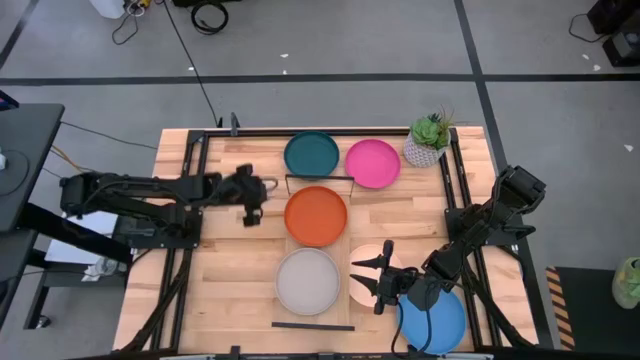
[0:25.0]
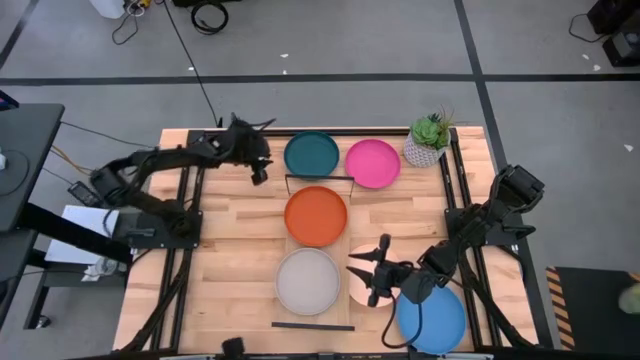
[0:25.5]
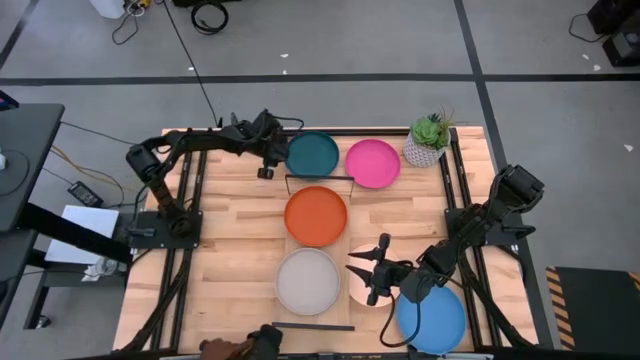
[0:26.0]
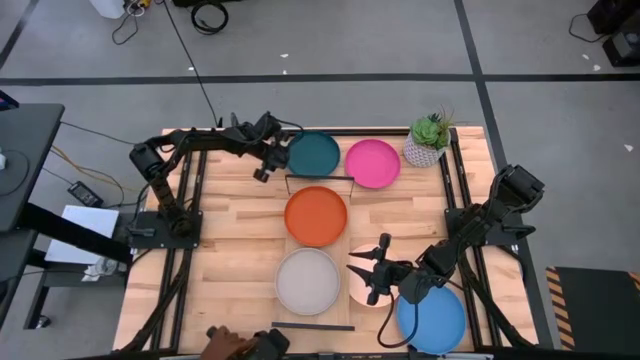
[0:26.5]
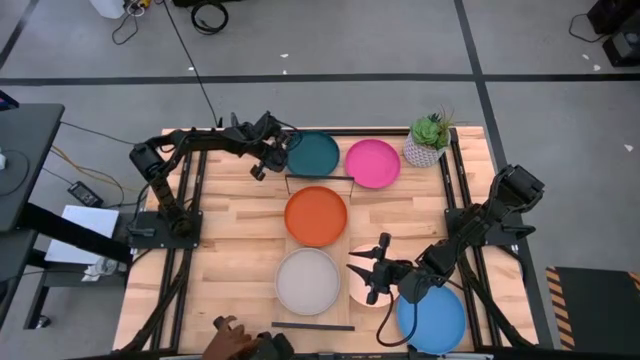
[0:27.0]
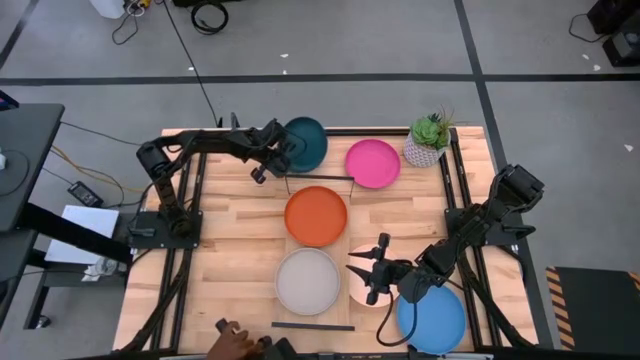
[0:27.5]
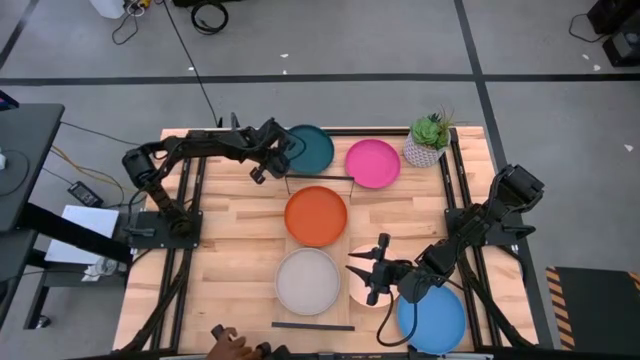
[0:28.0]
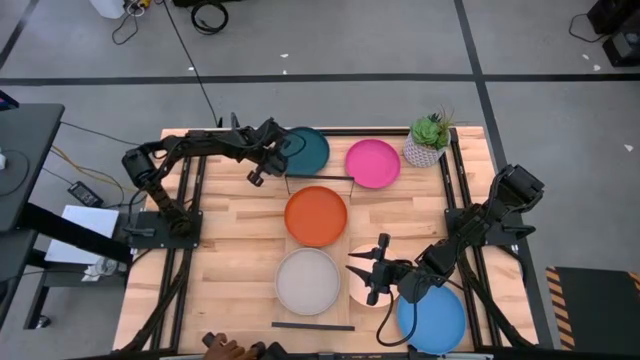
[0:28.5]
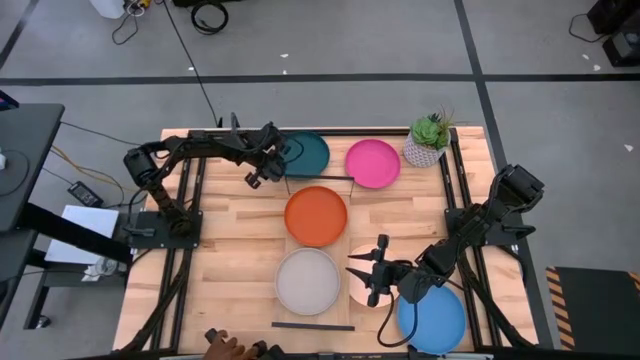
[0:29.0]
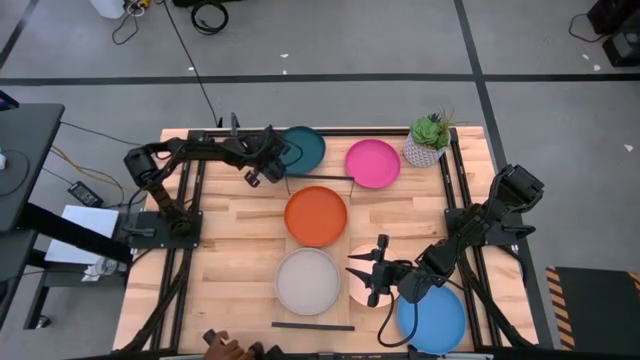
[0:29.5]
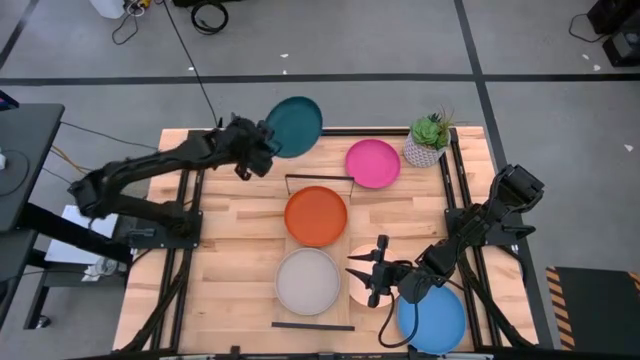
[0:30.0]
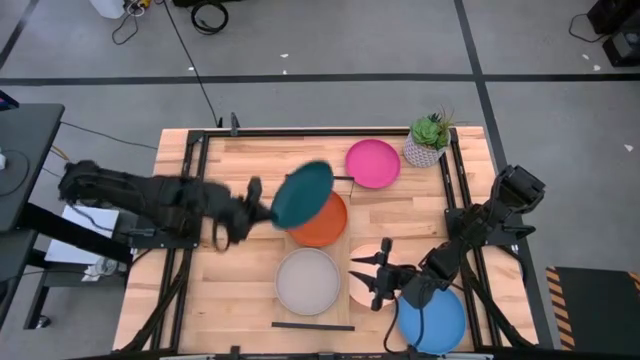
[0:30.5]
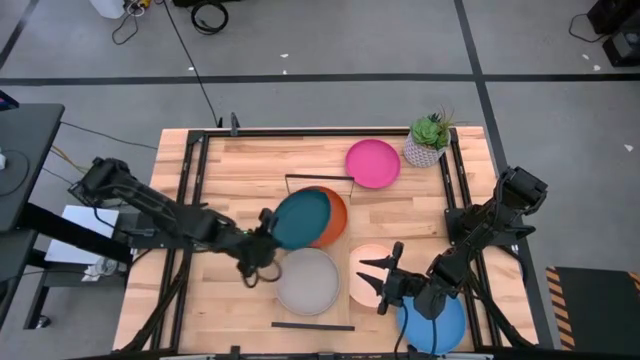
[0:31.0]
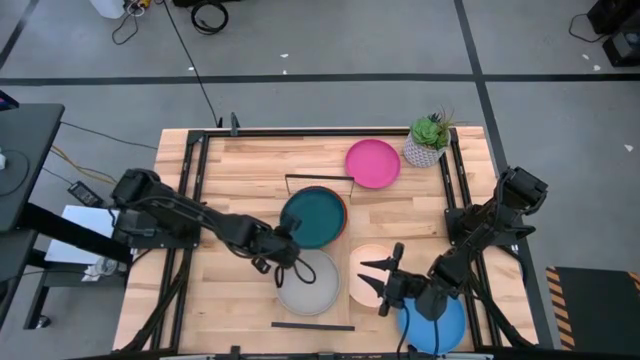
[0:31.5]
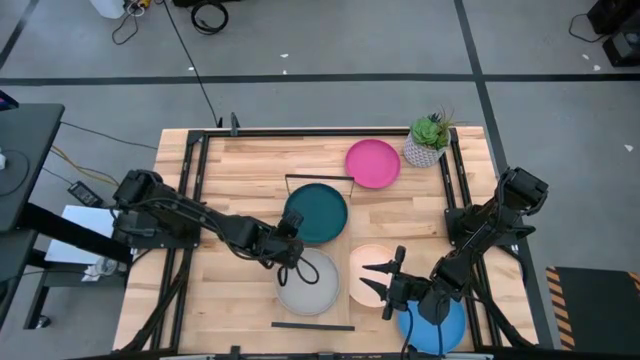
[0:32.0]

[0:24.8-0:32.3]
Task: Place and stack plates onto a shelf
Stack the dark blue plate on top of the orange plate on the shelf

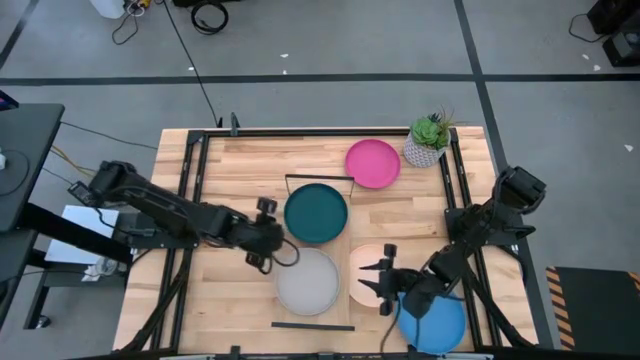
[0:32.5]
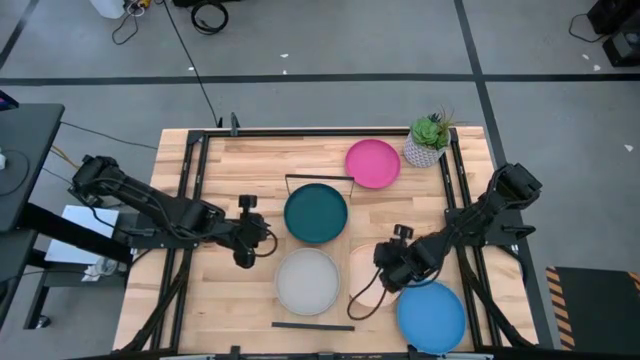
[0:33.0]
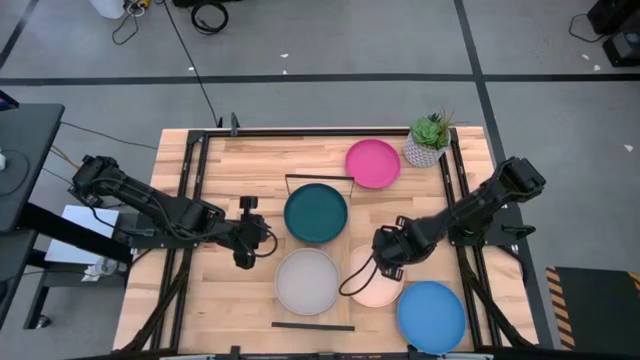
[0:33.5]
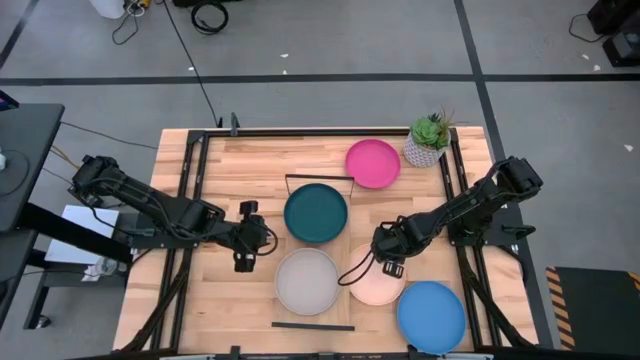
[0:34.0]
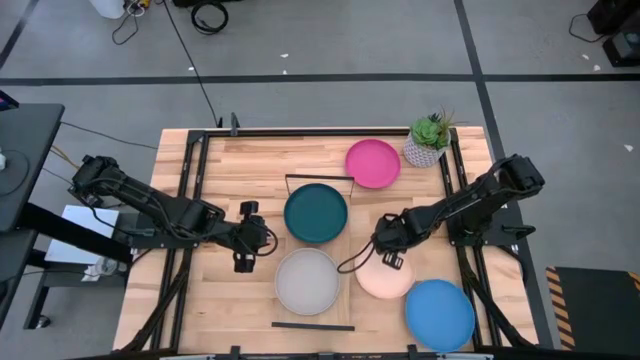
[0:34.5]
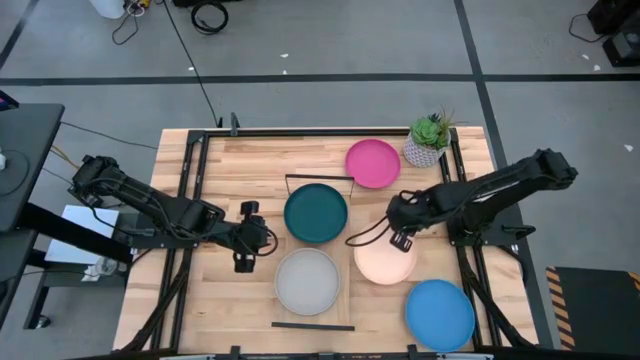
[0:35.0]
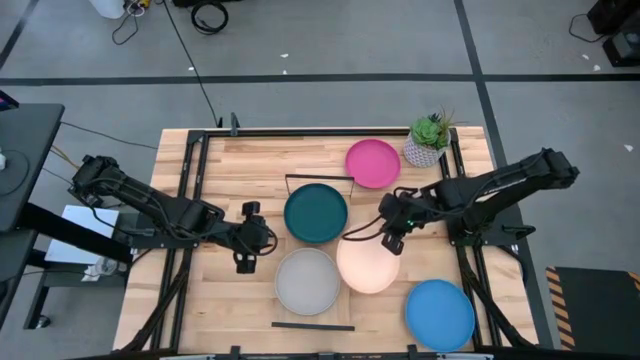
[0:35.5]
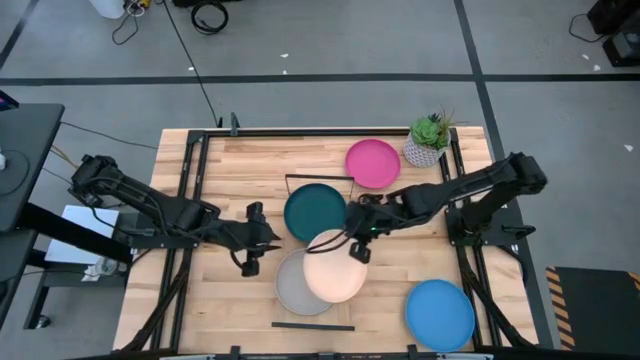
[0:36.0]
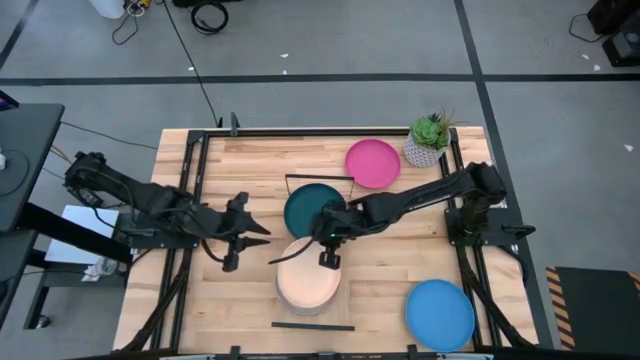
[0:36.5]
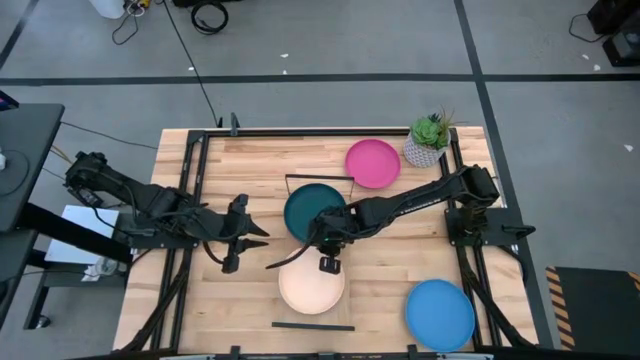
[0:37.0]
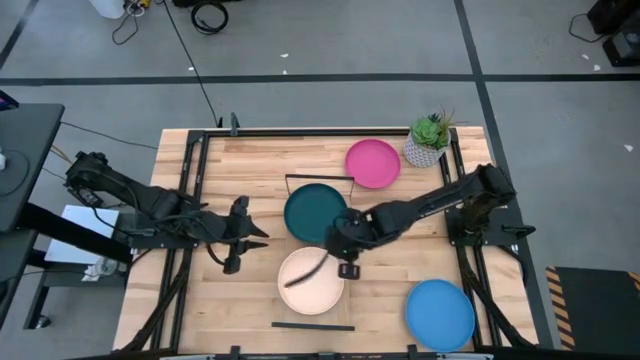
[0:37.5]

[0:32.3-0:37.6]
Stack the light orange plate on top of the gray plate on the shelf

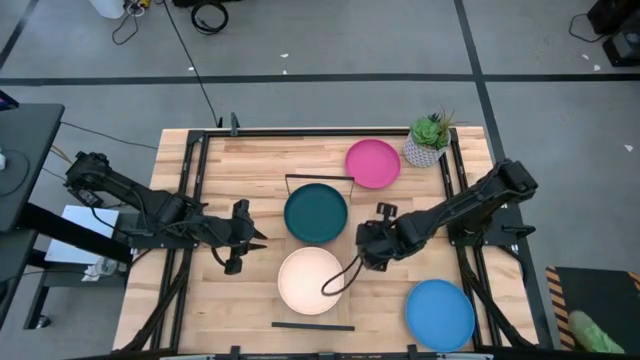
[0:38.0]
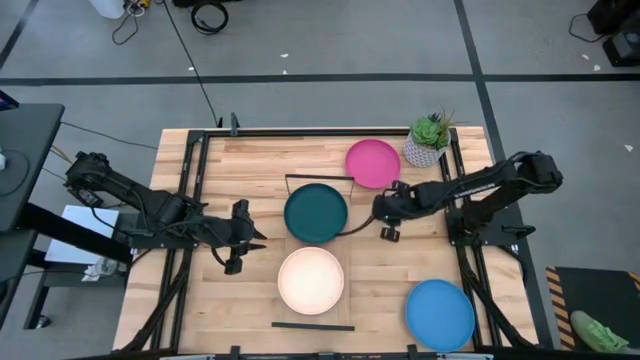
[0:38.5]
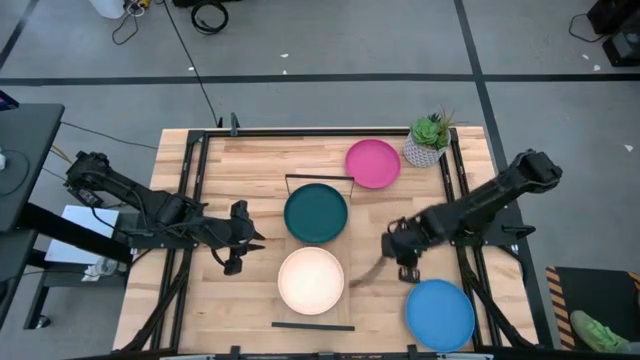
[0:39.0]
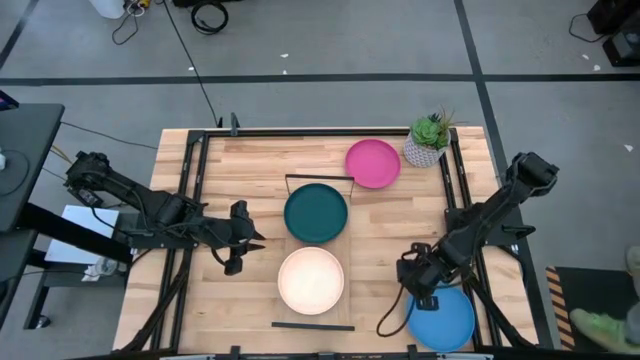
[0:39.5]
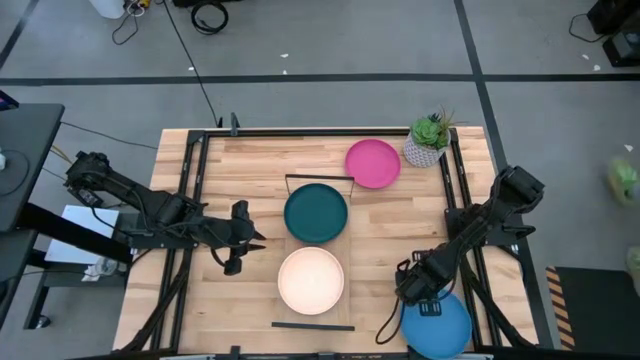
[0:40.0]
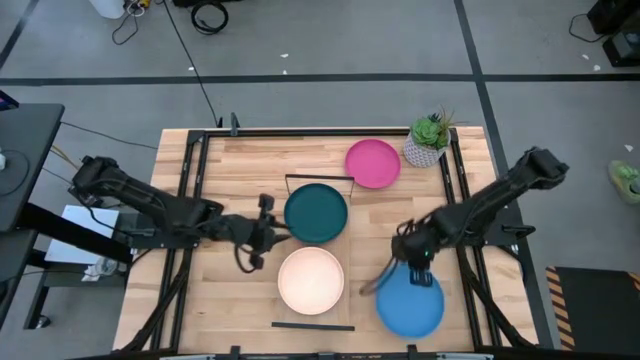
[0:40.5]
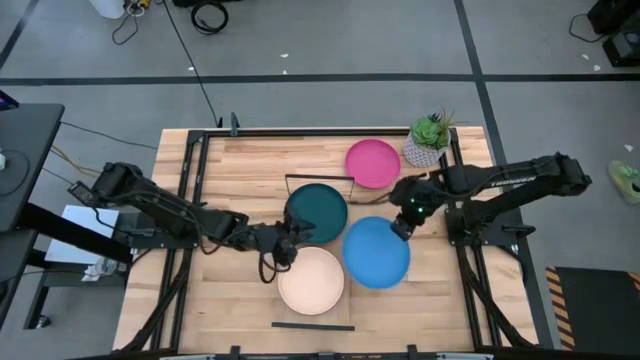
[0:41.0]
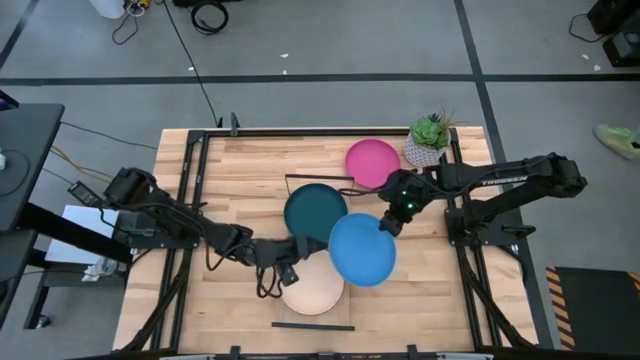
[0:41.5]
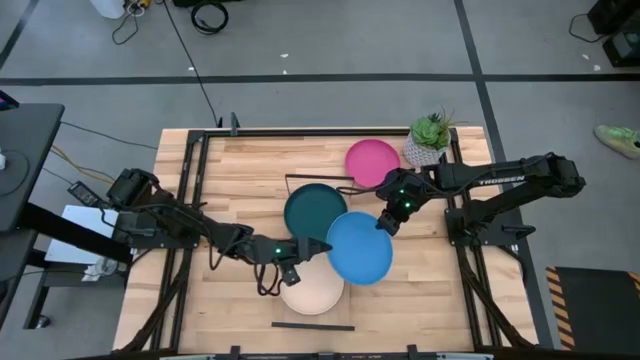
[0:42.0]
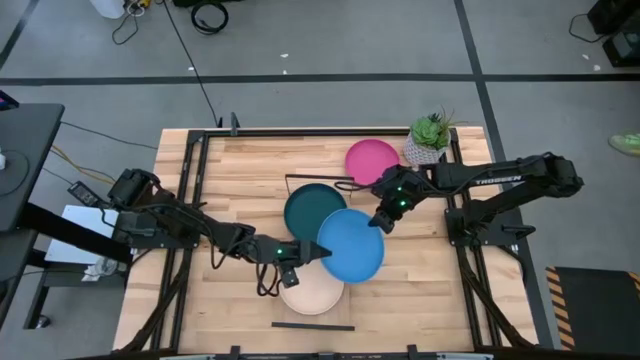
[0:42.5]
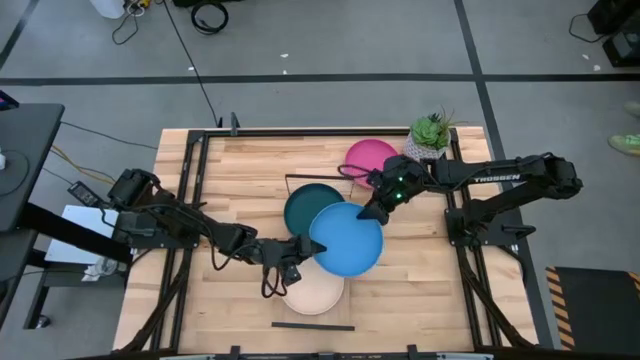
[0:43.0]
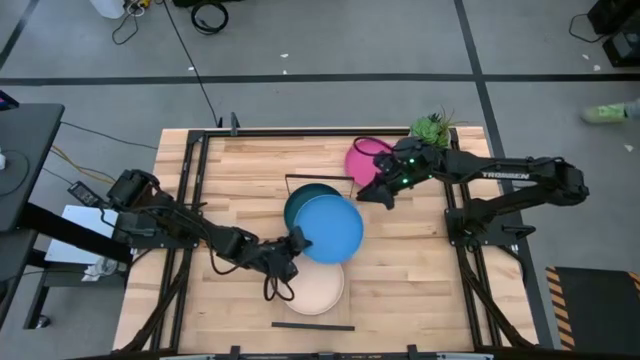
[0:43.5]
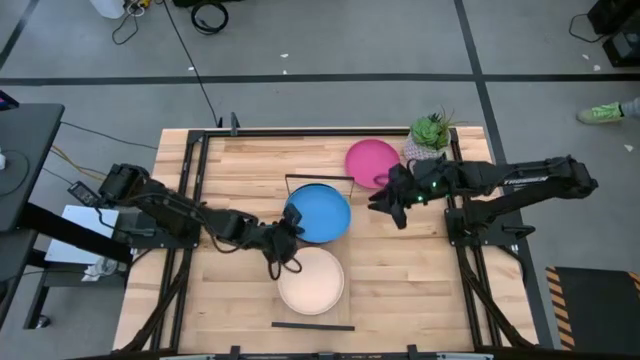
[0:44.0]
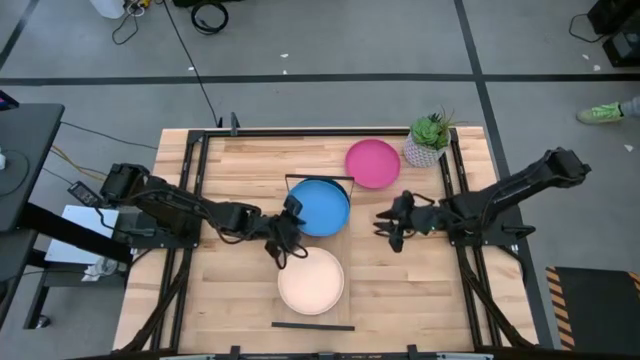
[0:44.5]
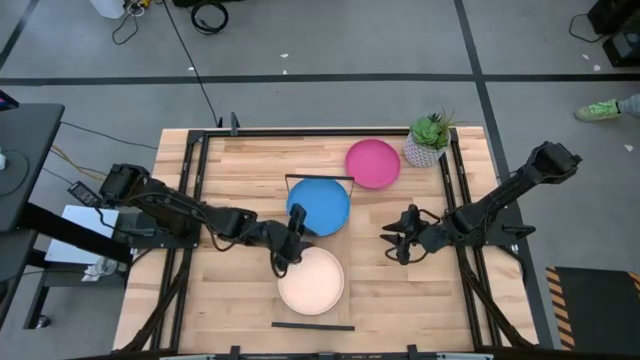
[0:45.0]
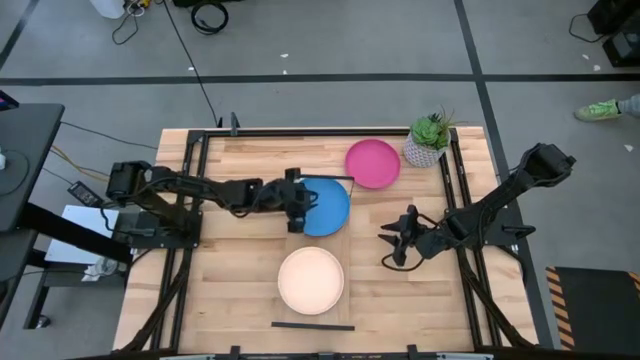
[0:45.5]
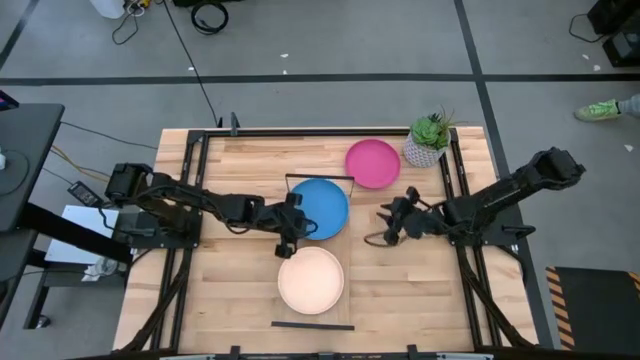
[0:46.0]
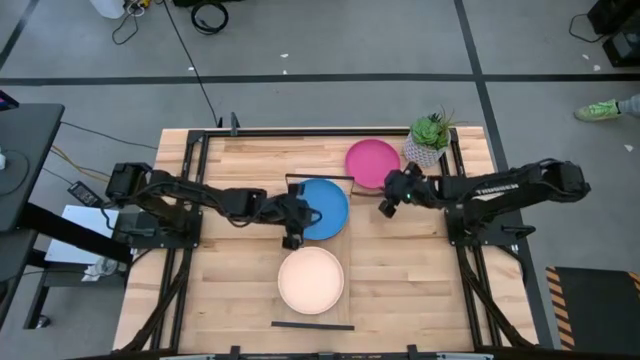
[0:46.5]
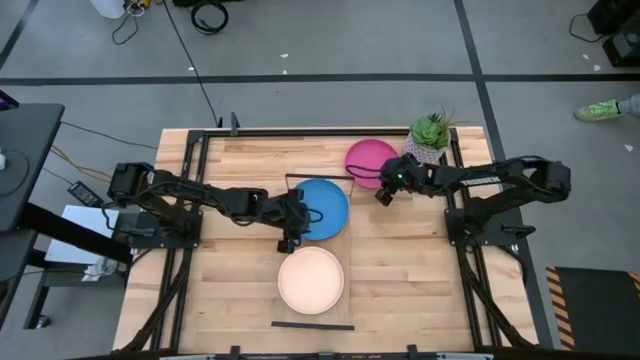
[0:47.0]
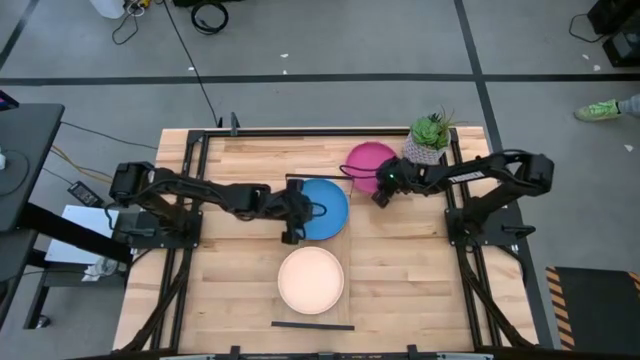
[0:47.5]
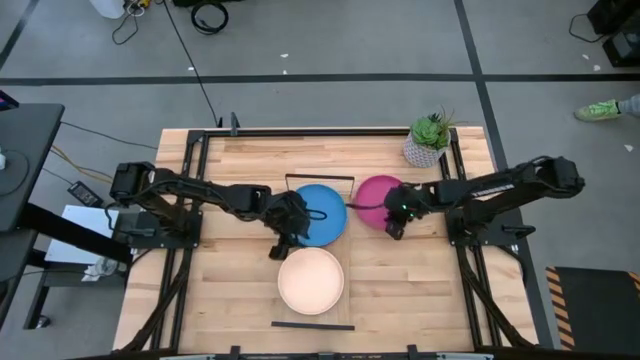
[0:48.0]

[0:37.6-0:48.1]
Stack the light blue plate on top of the dark blue plate on the shelf
